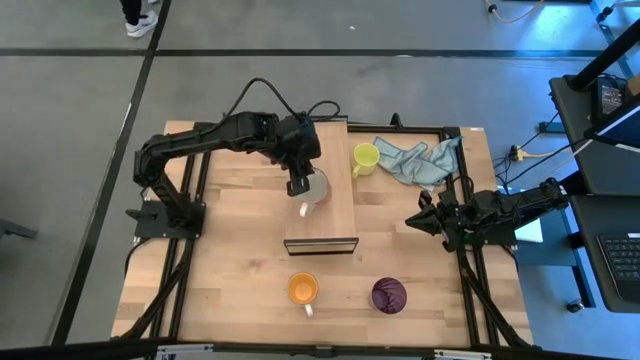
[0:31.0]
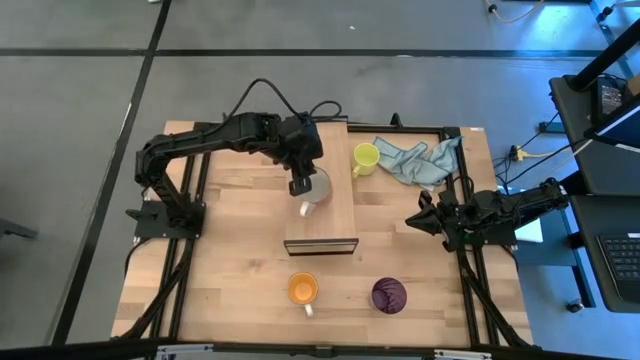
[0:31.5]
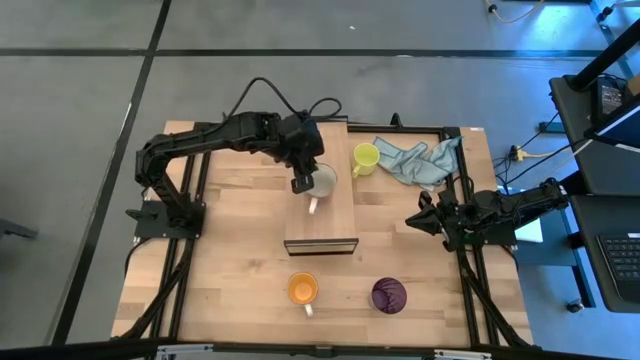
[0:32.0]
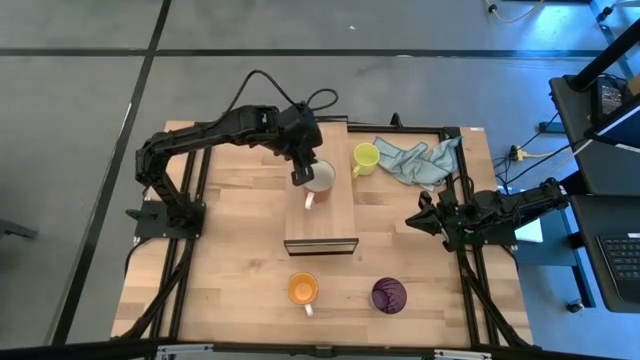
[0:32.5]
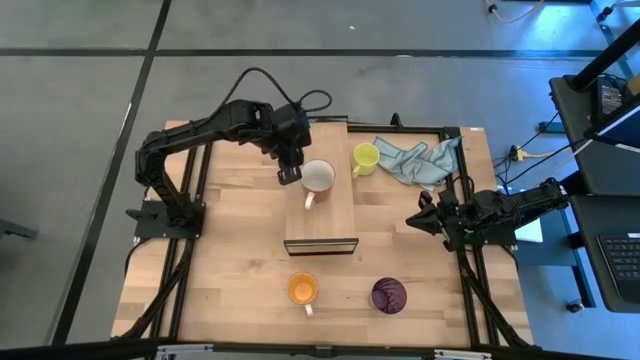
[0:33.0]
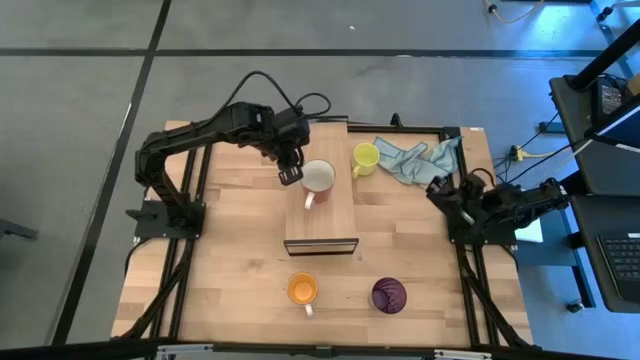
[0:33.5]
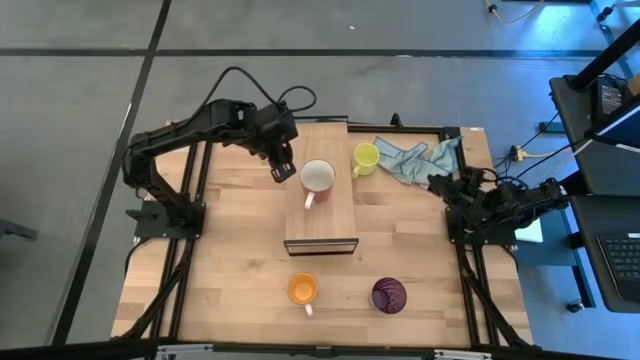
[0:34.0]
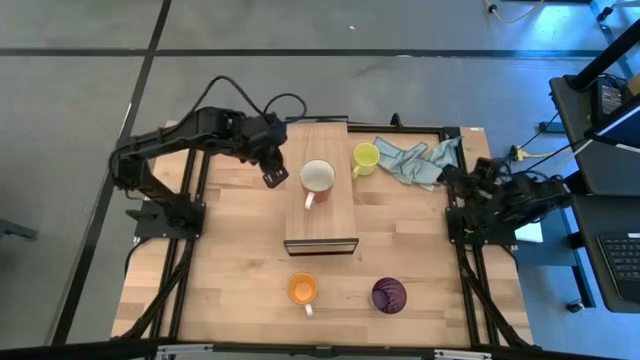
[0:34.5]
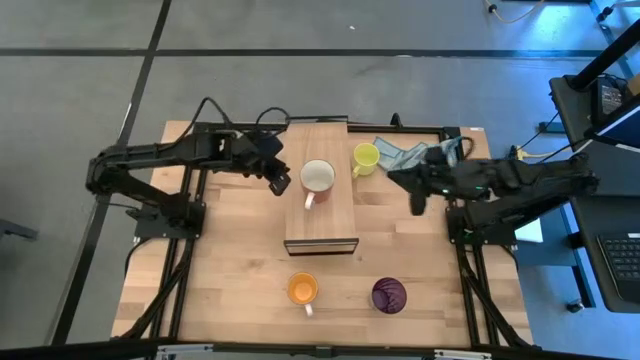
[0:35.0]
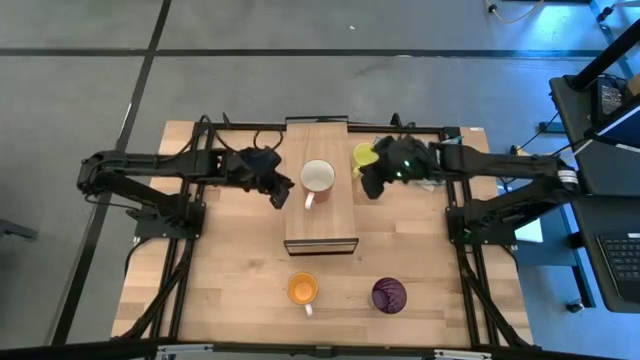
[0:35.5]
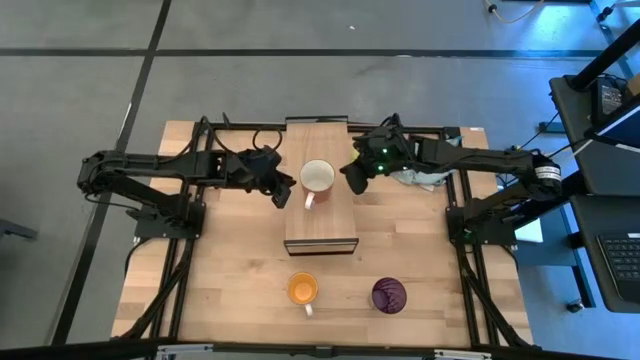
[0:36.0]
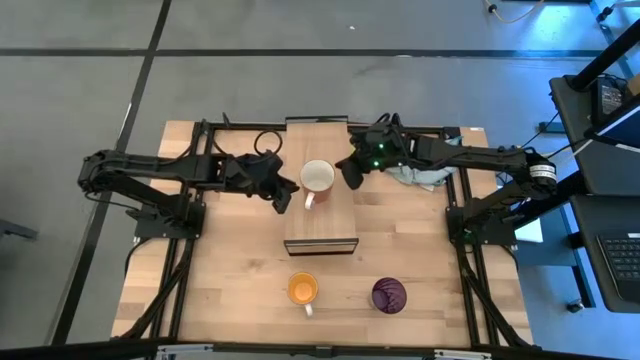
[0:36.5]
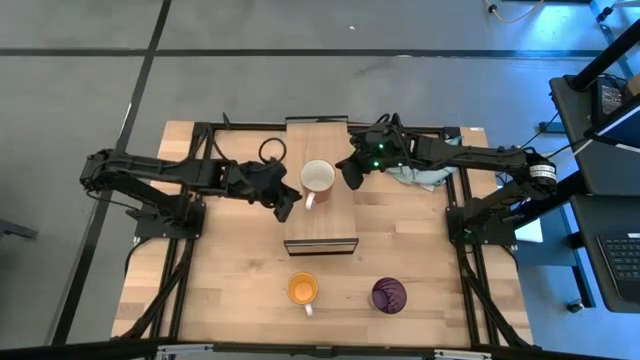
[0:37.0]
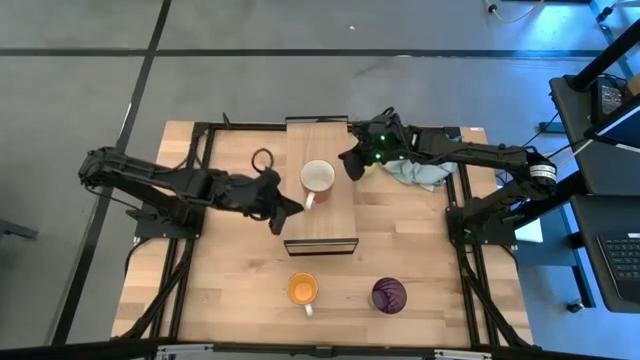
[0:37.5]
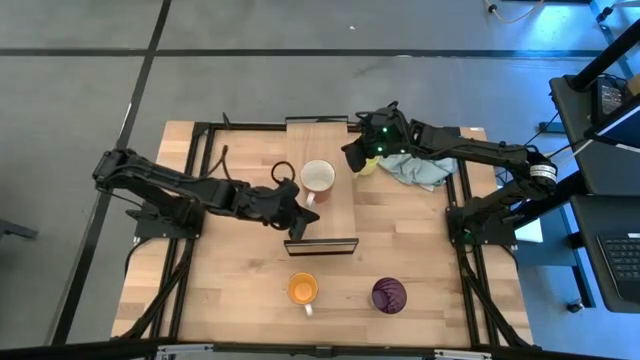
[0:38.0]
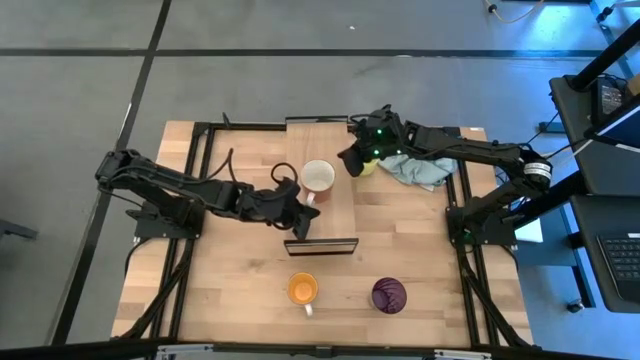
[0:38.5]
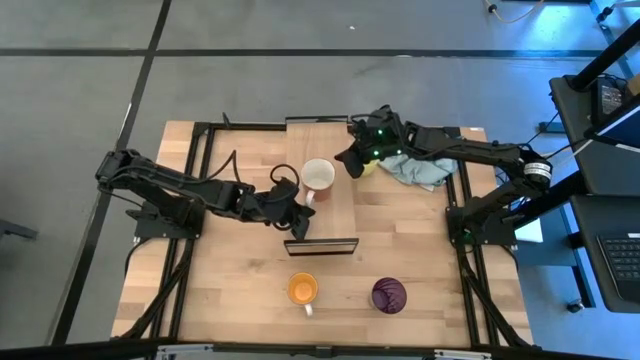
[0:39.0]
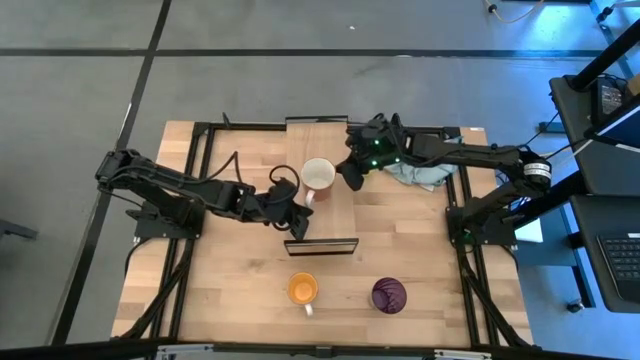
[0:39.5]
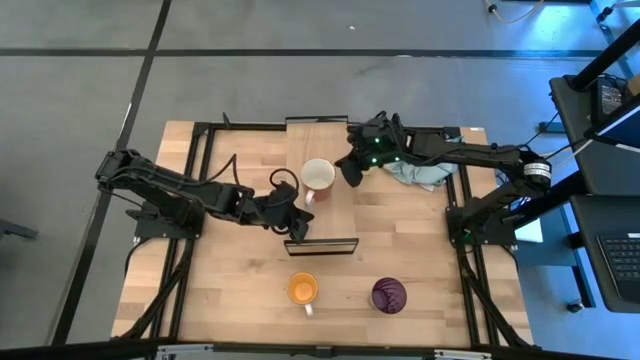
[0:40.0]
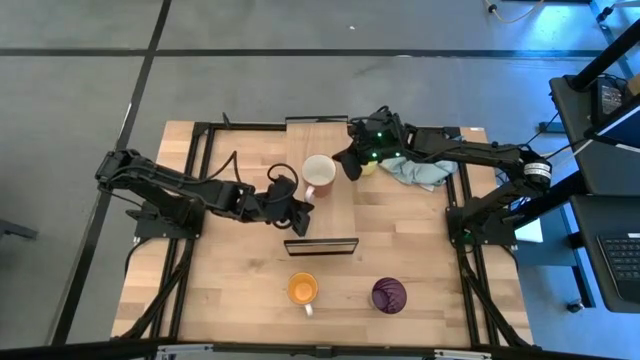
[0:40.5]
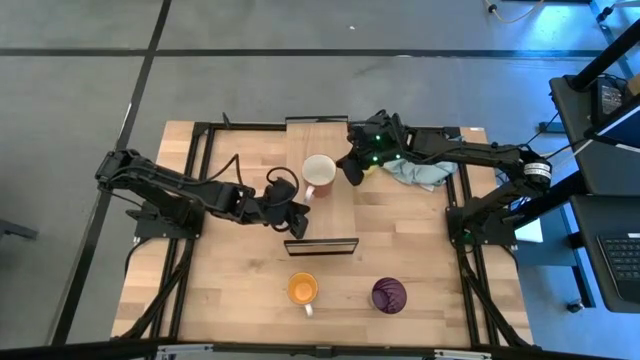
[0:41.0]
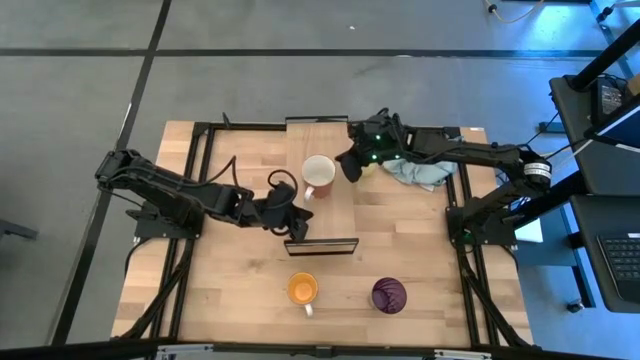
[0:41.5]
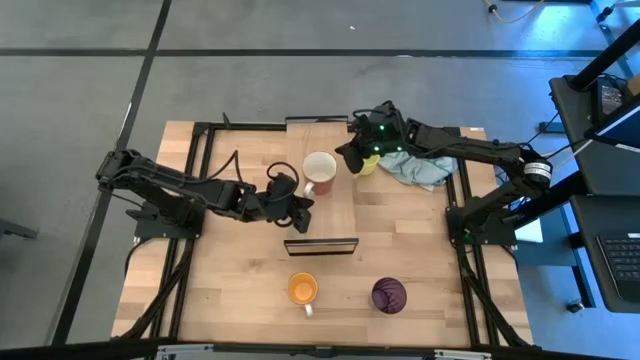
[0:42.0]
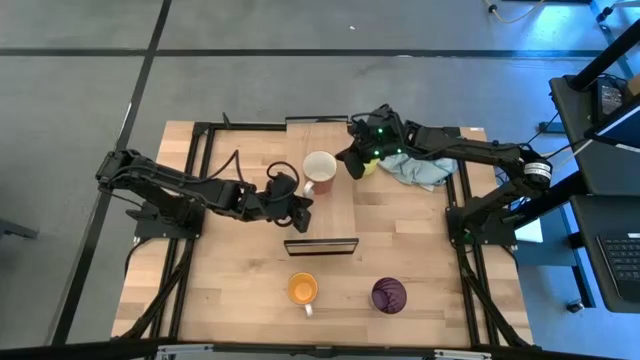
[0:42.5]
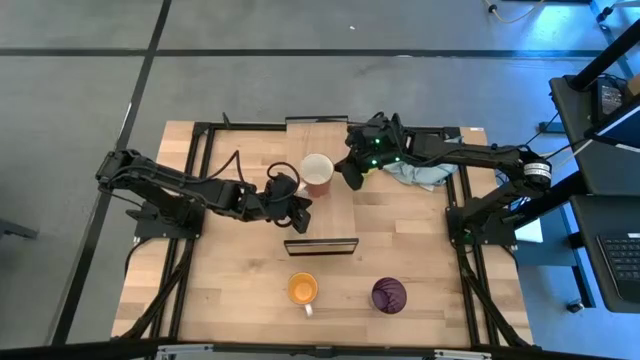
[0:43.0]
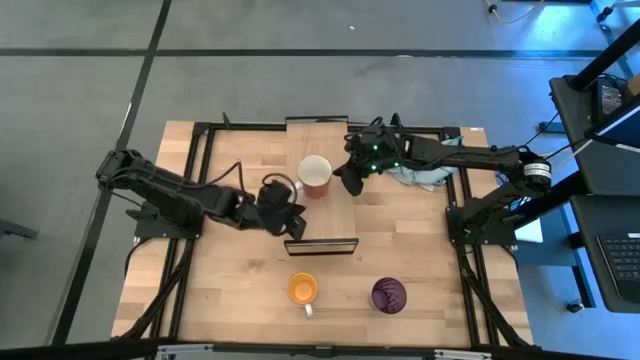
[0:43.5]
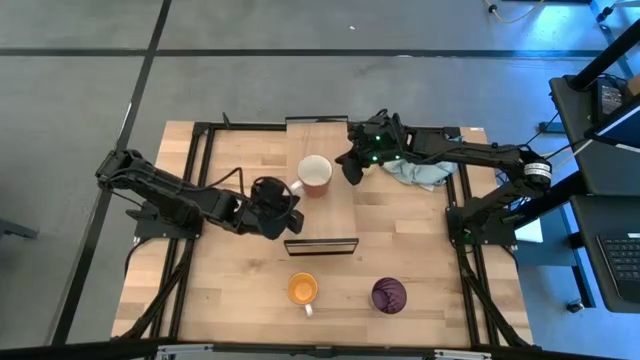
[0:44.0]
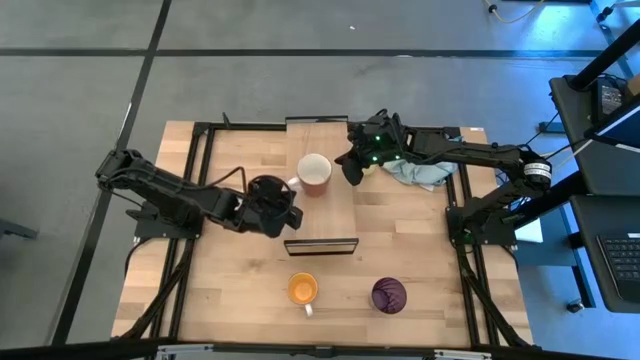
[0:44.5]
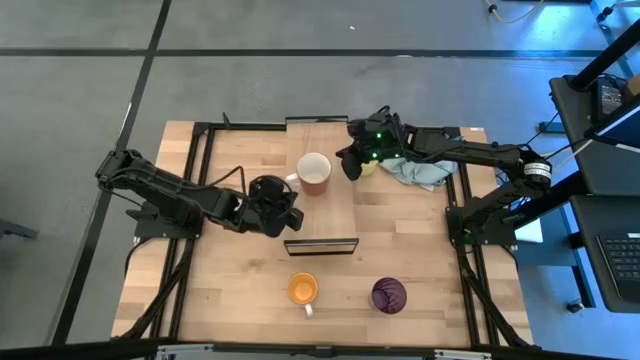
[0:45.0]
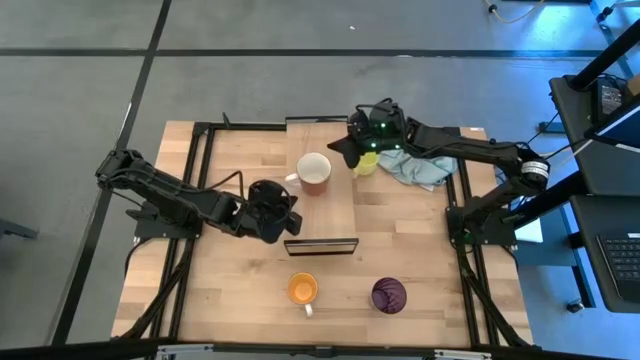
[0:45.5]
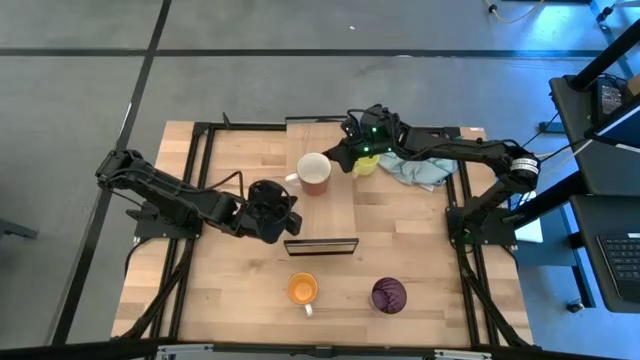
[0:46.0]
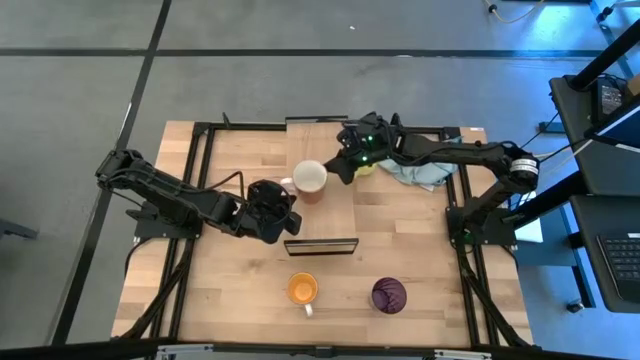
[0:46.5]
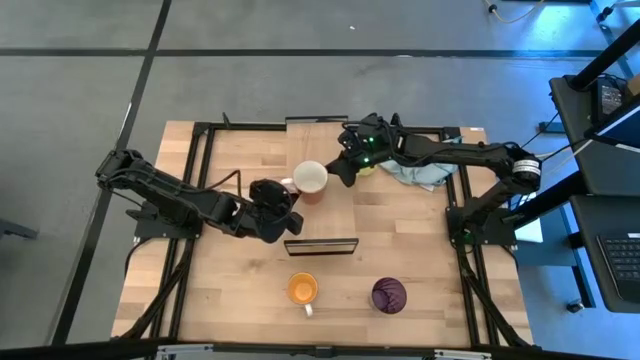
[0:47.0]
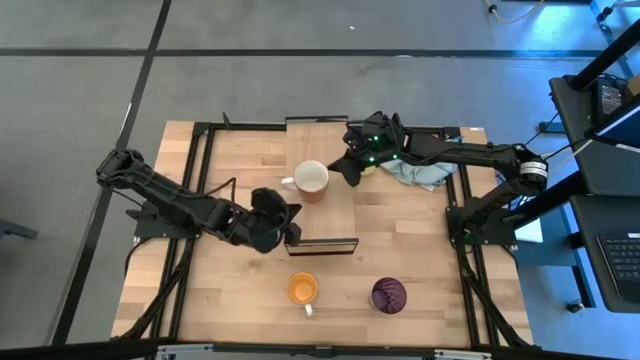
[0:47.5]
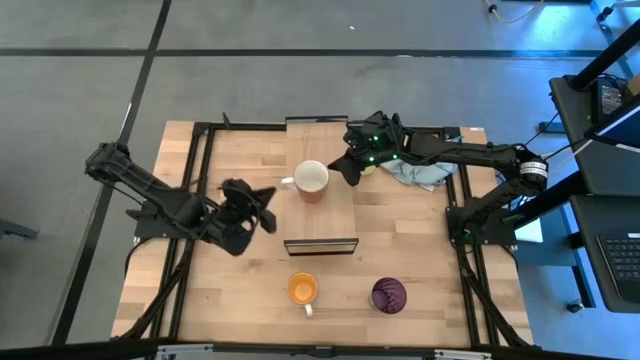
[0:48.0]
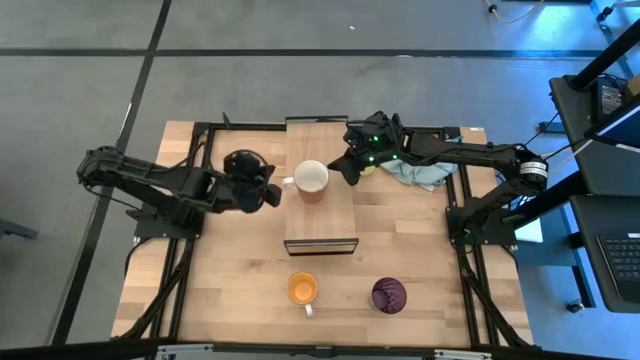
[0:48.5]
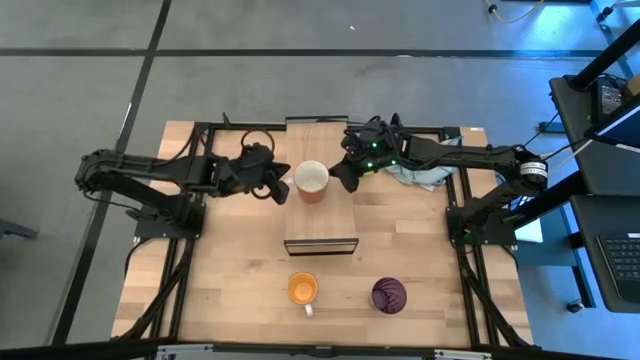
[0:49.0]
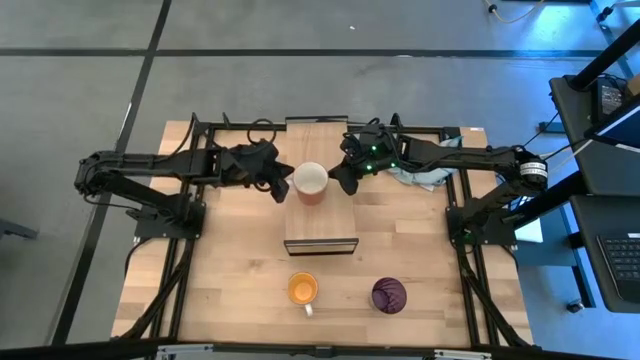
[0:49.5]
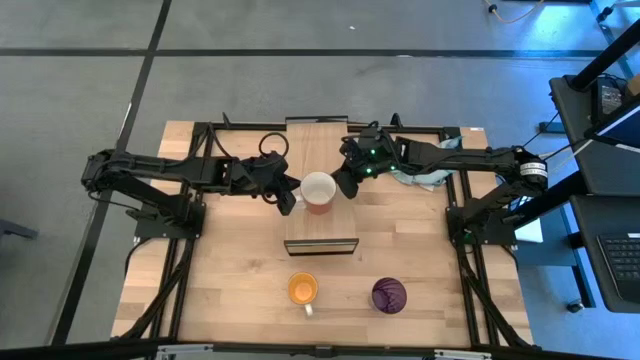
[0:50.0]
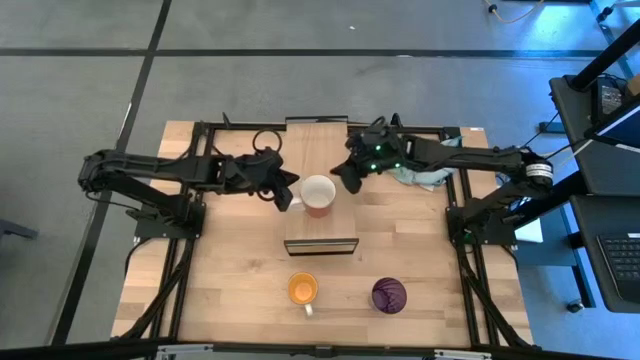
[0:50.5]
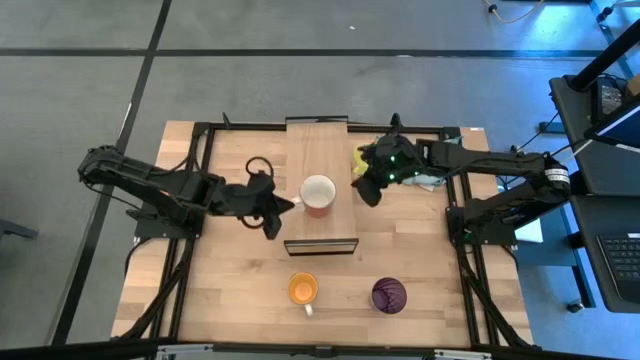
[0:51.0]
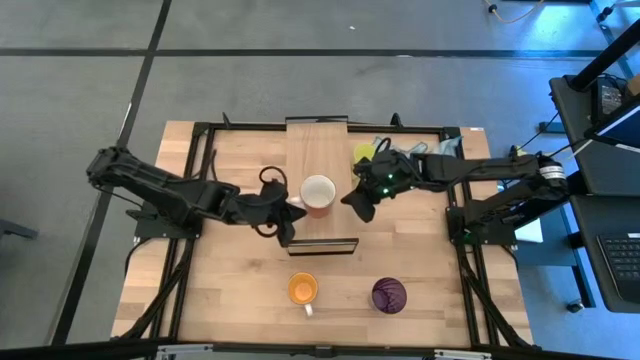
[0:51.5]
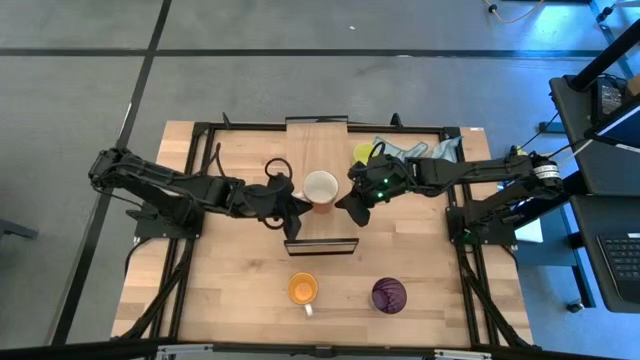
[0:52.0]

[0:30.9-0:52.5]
Task: Stack small to large cups/mugs on shelf
Put the orange mug on the shelf
